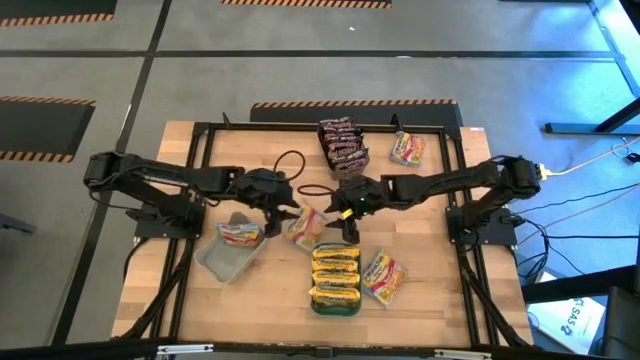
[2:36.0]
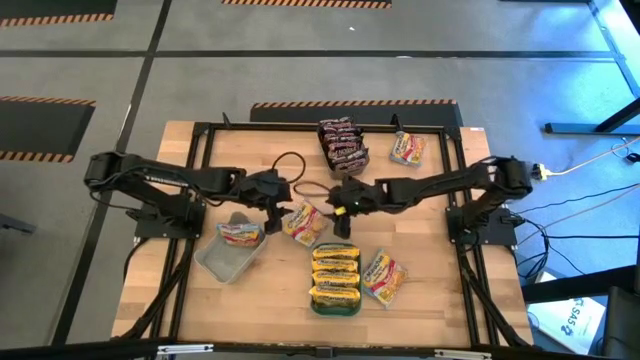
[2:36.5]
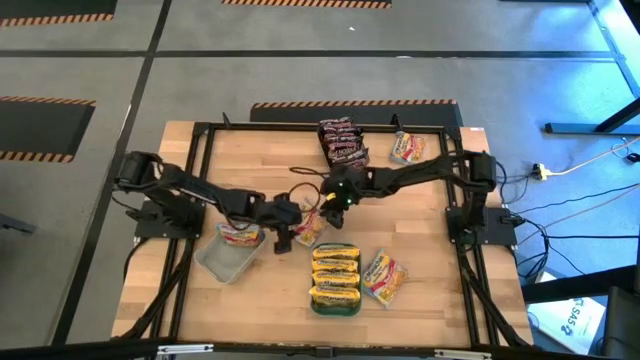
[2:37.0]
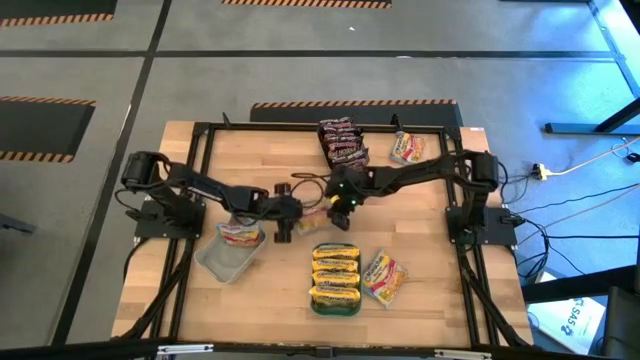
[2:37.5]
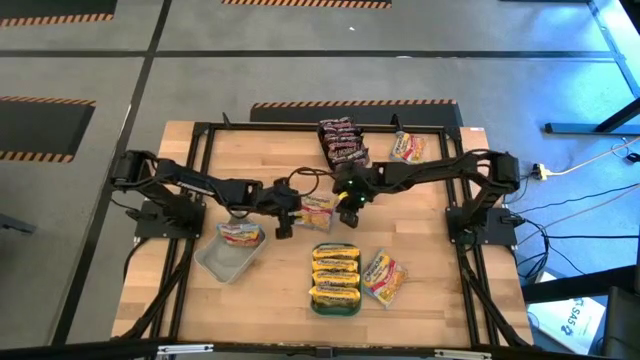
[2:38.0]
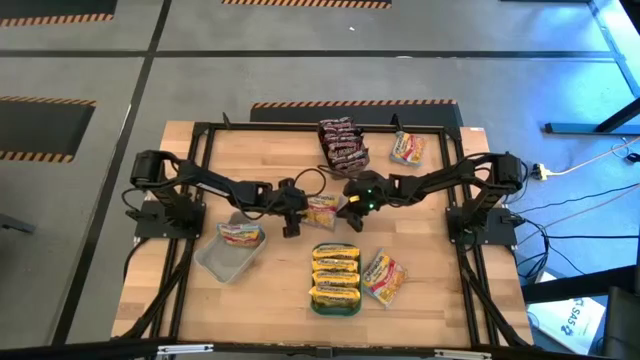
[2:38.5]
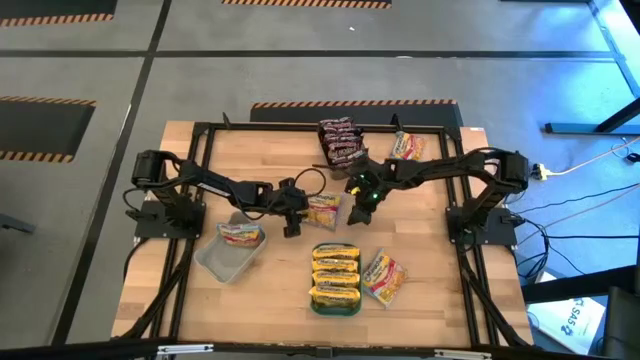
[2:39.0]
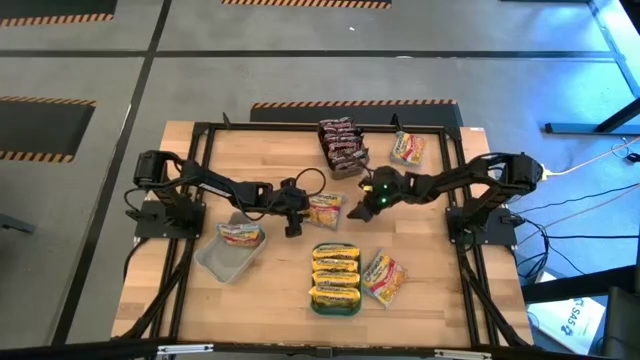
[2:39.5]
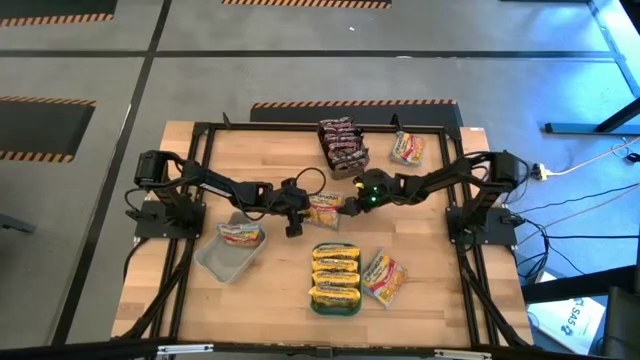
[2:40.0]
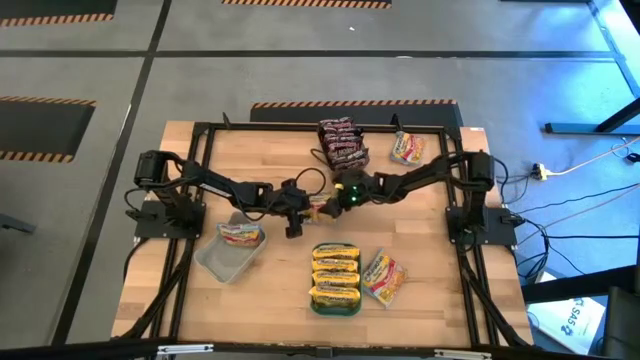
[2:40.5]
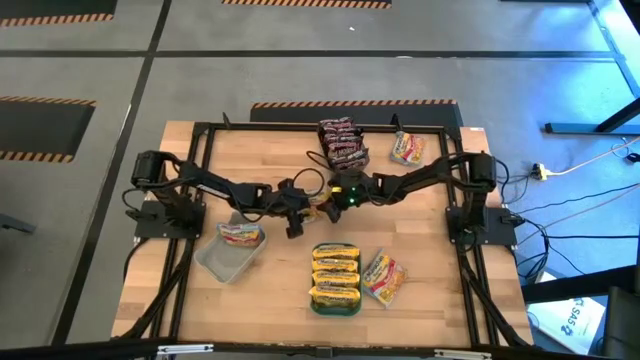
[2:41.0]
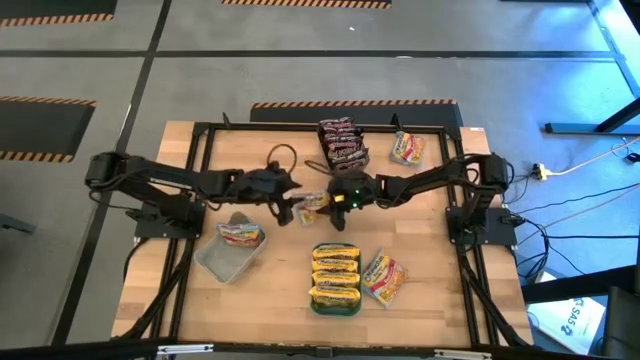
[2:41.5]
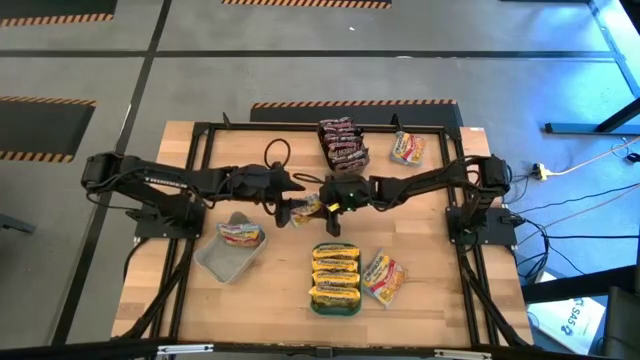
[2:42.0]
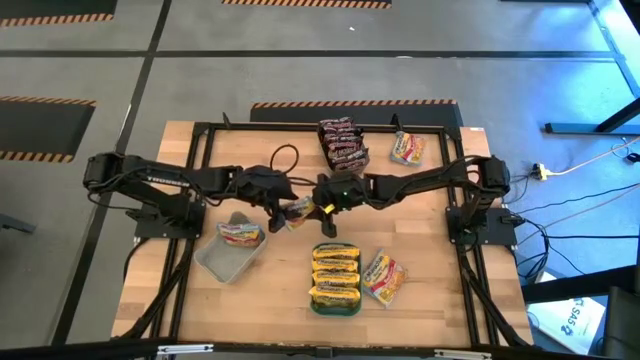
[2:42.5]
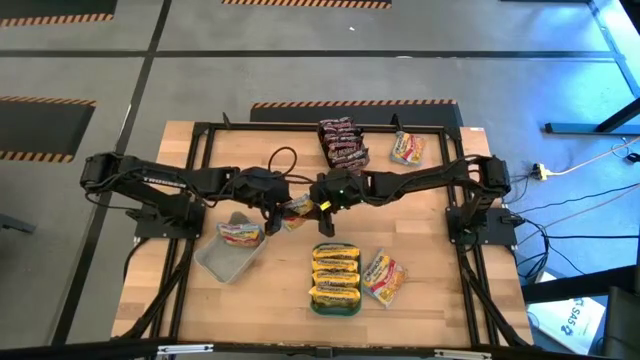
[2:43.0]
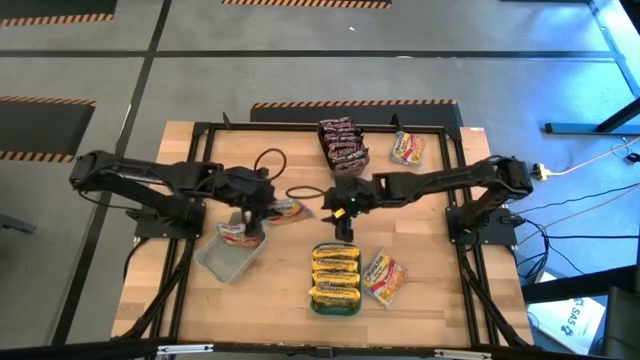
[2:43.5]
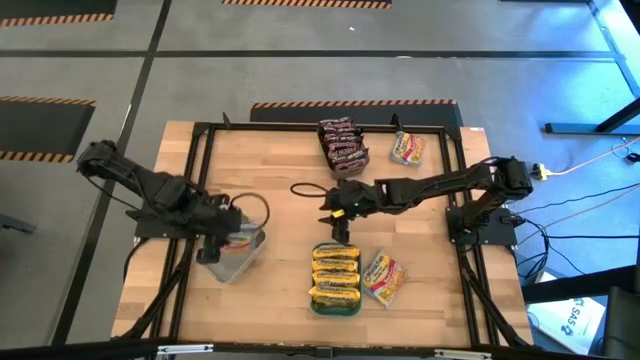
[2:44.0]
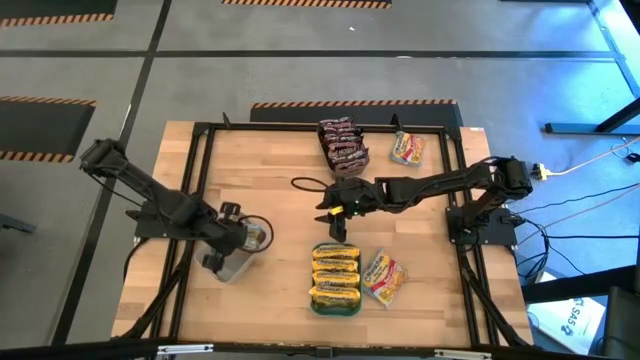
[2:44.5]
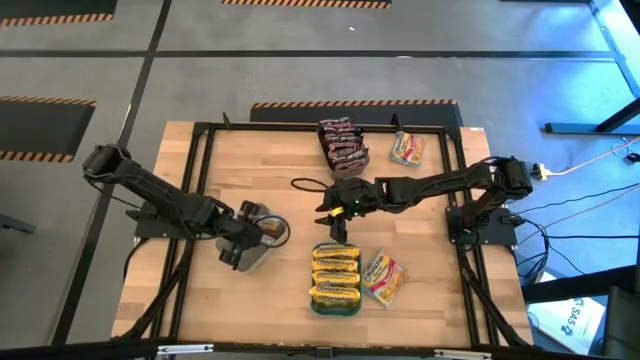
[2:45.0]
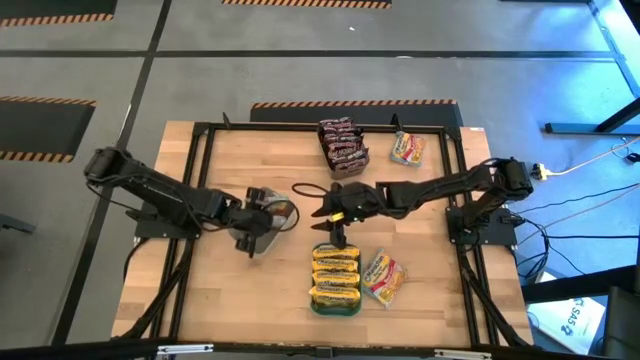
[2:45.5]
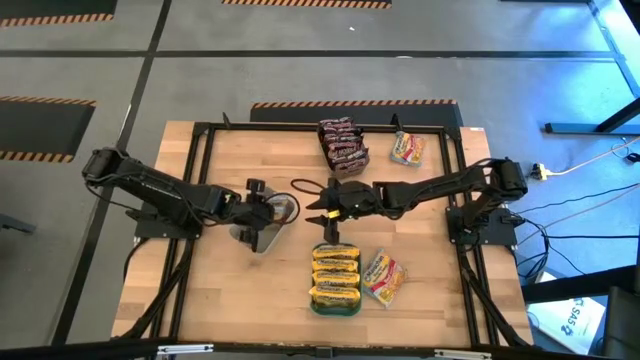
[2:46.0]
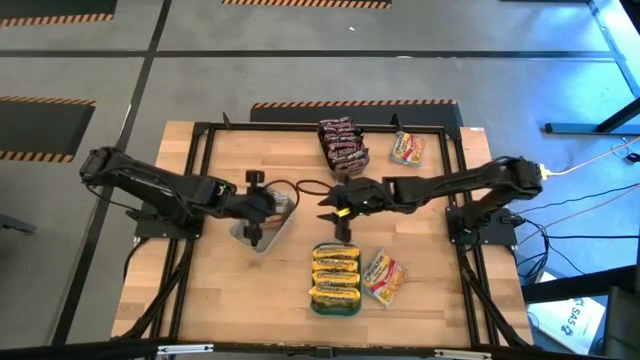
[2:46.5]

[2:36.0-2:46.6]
Task: Sort Maruchan noodles
Put the blue noodle pack into the white bin

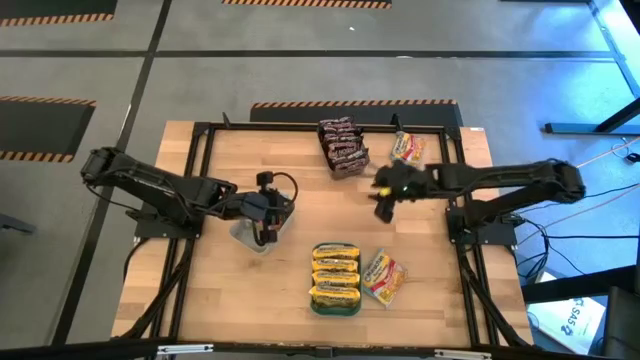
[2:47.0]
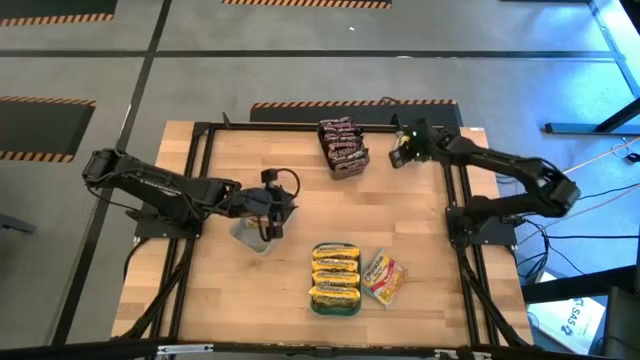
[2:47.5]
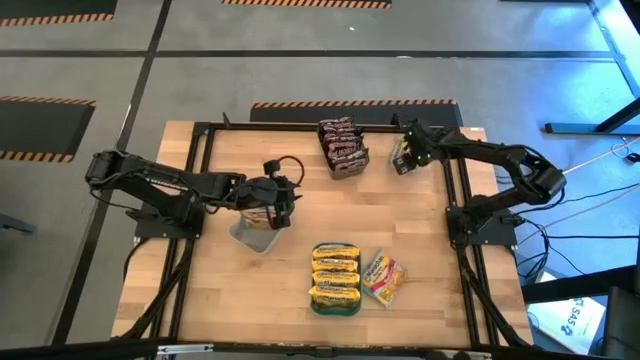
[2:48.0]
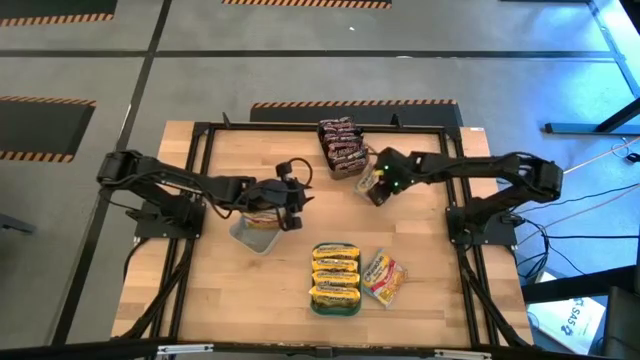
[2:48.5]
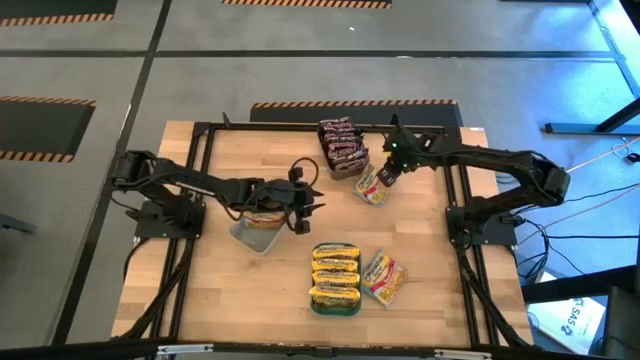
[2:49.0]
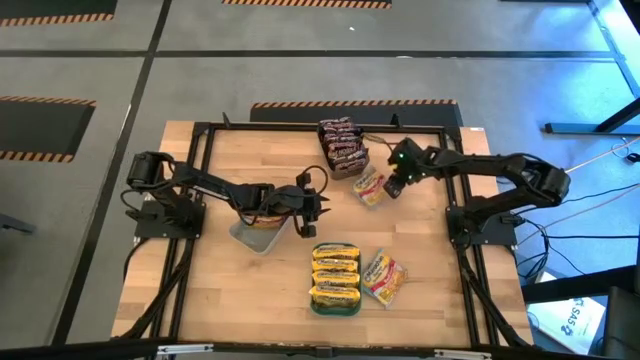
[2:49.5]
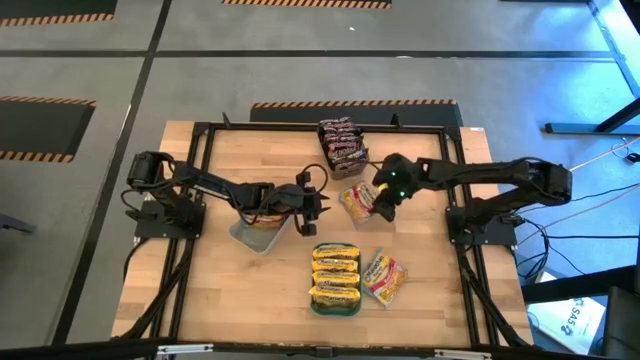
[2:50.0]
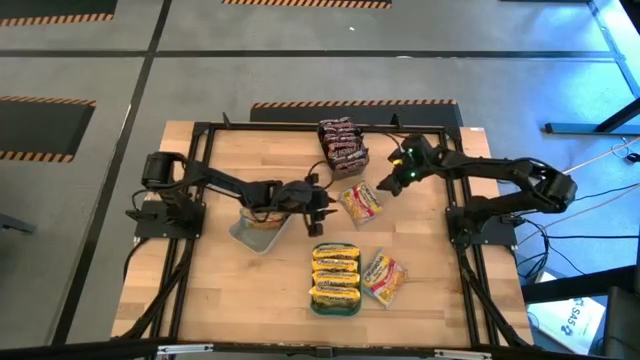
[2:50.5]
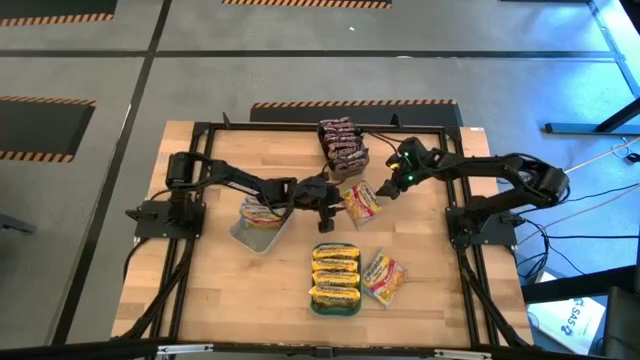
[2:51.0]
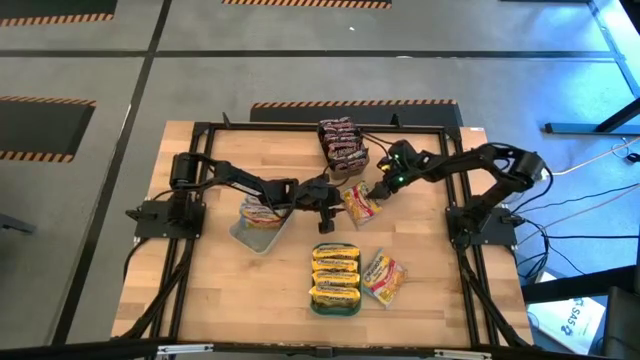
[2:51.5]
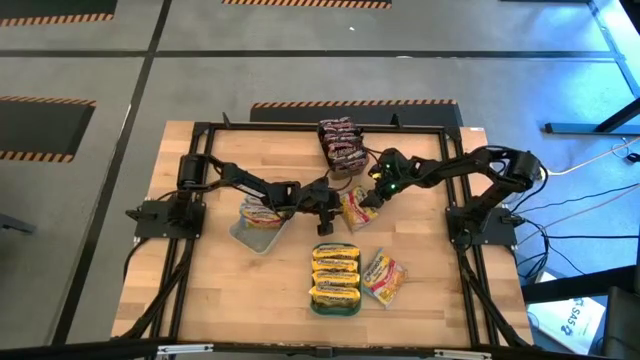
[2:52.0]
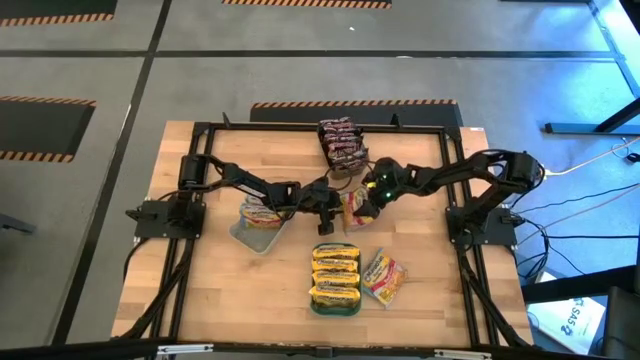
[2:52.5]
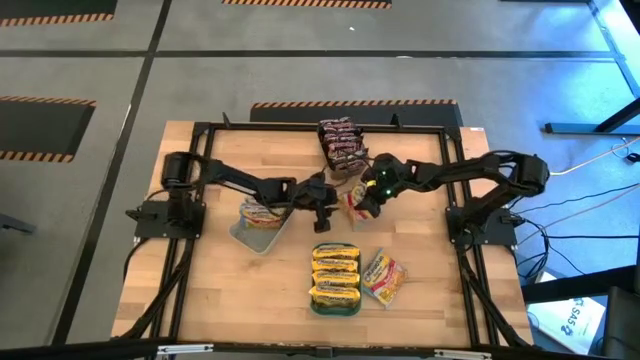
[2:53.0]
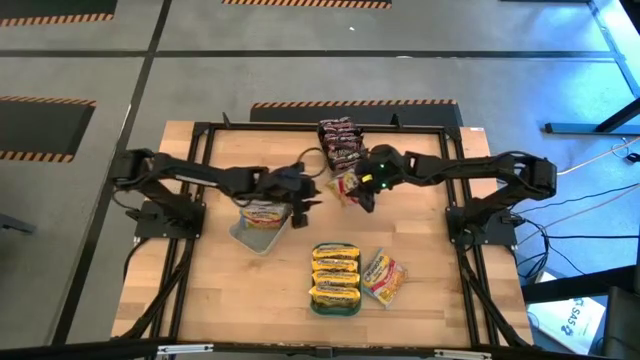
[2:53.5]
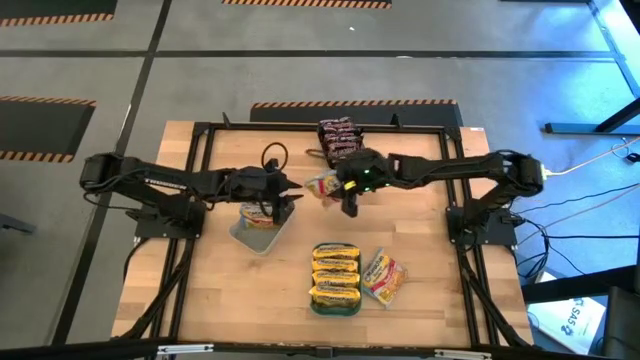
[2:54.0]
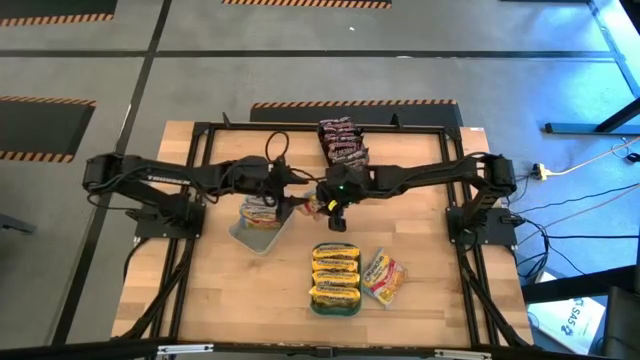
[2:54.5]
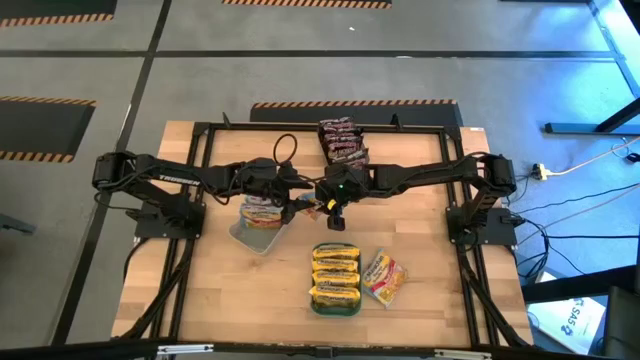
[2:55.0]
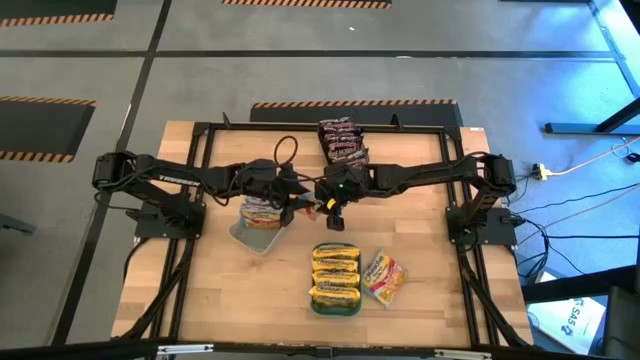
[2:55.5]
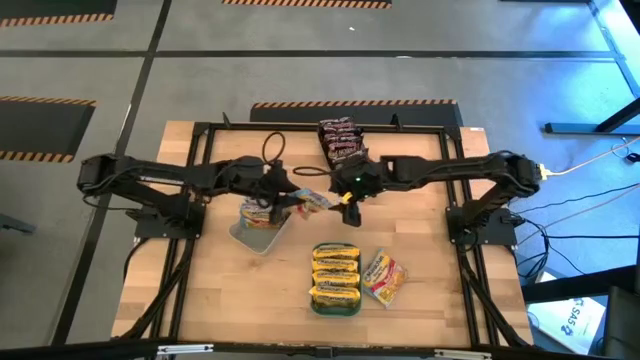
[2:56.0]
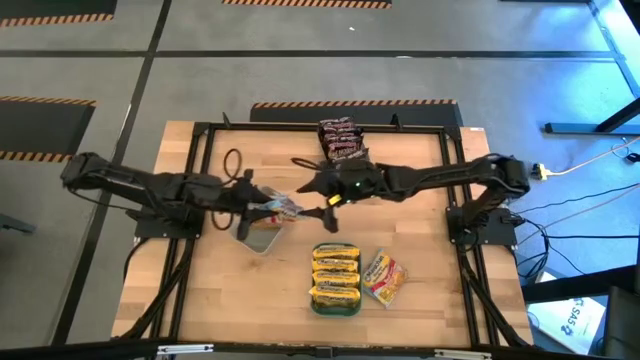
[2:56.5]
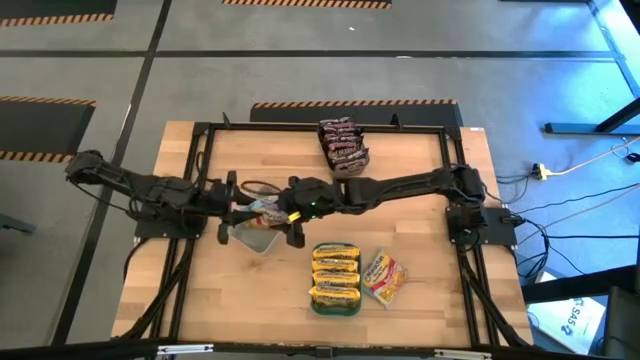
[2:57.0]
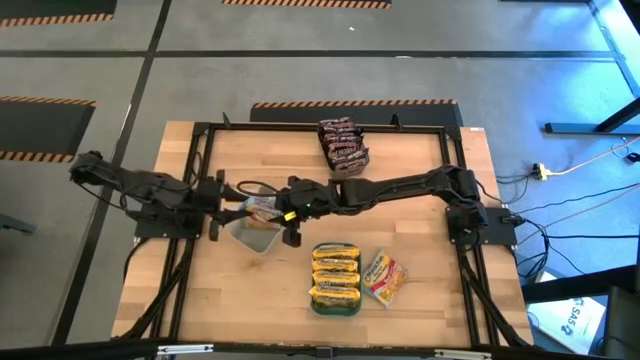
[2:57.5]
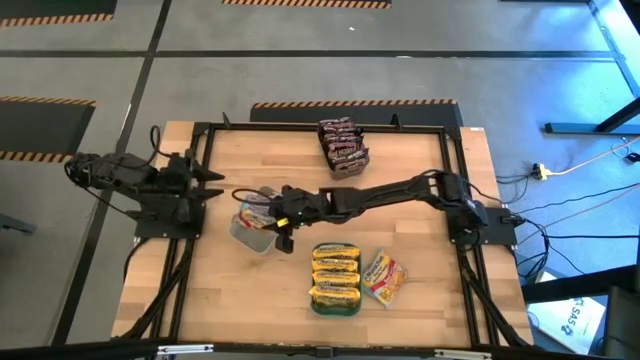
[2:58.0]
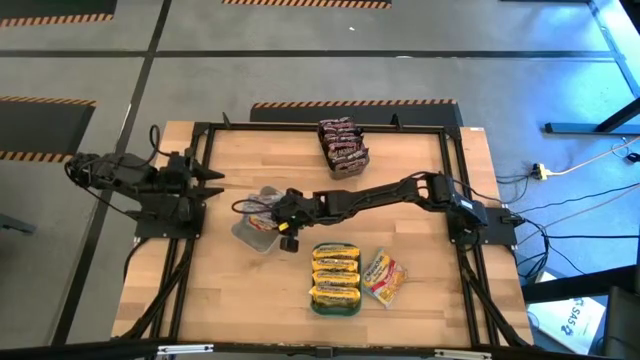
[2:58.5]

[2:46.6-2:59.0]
Put the blue noodle pack into the white bin
